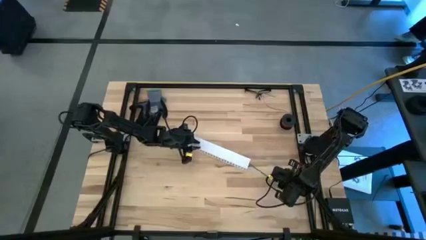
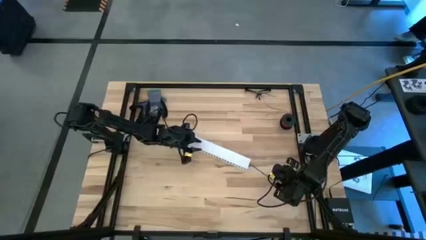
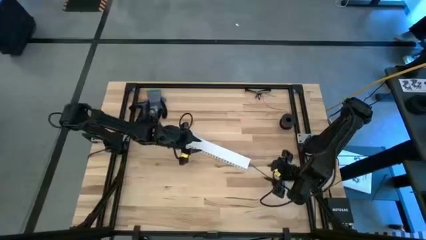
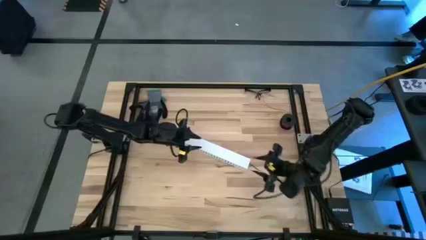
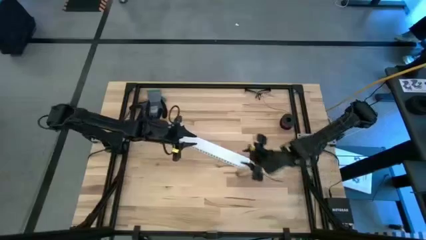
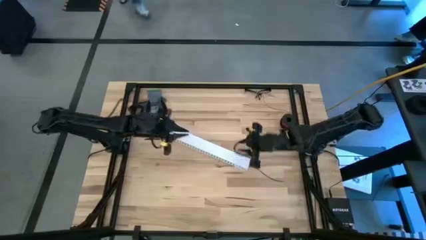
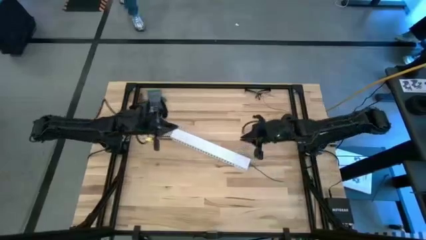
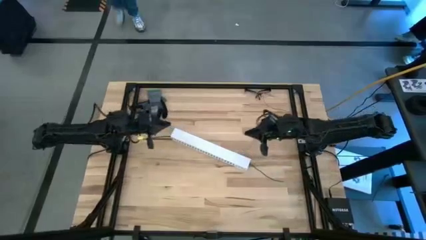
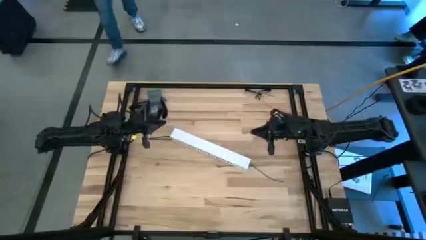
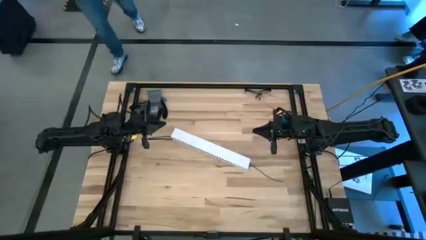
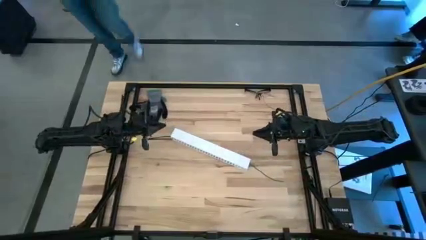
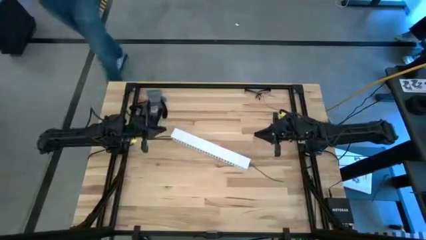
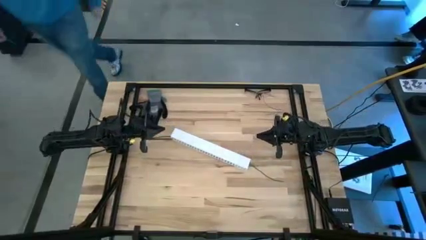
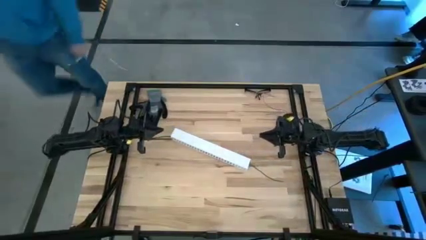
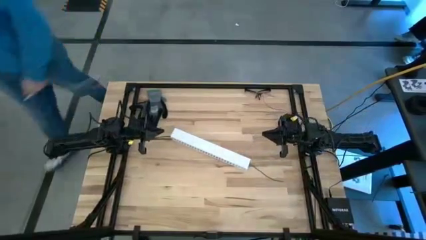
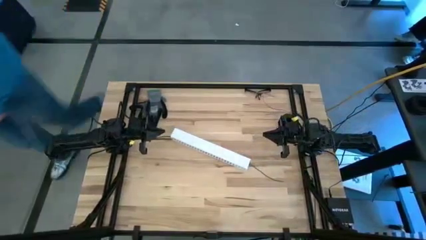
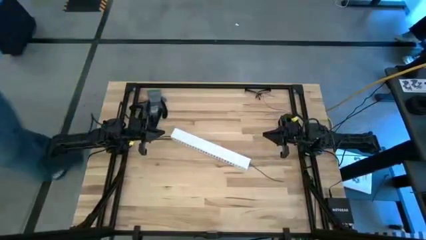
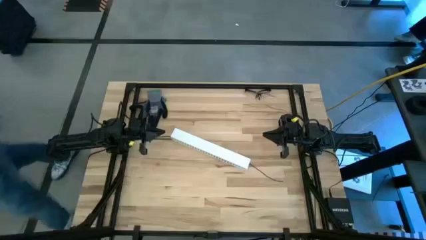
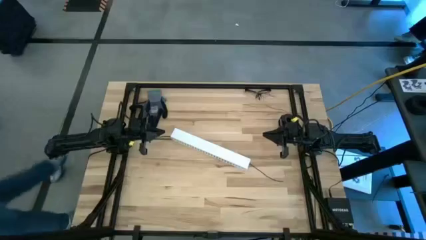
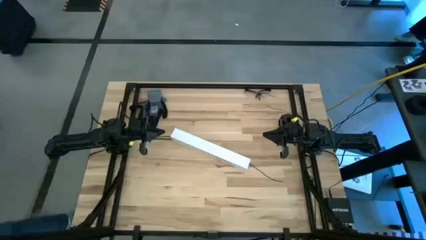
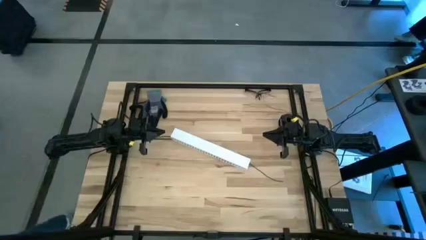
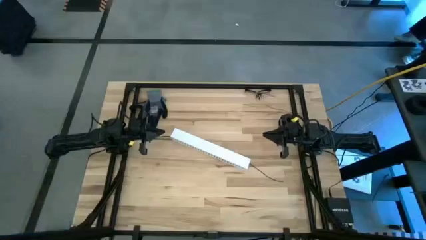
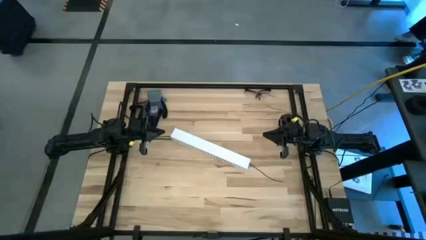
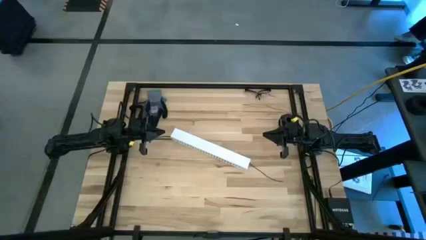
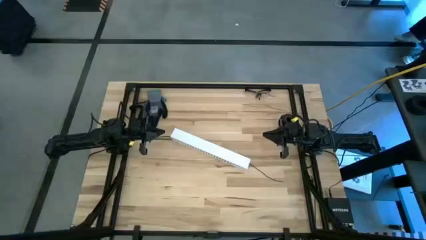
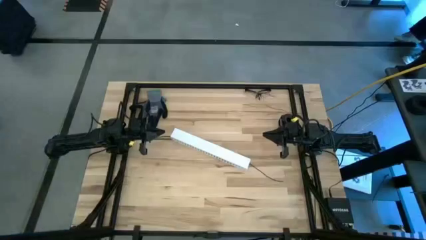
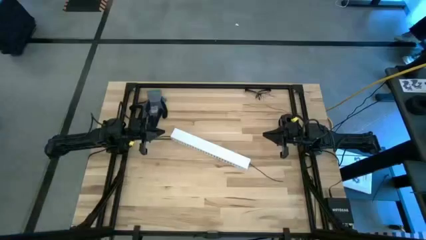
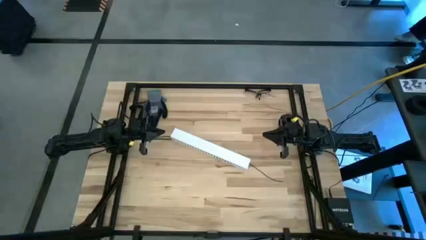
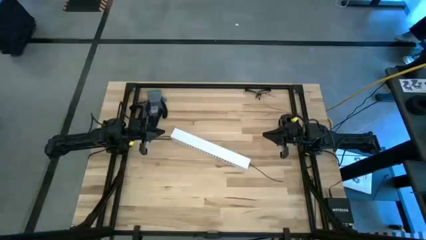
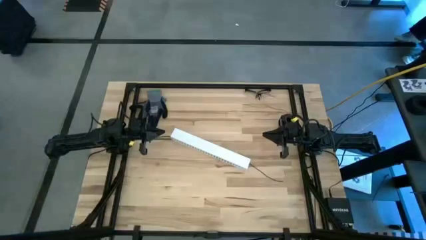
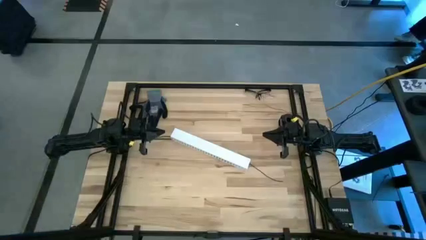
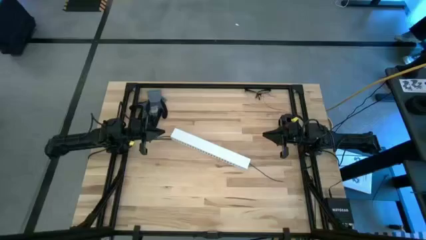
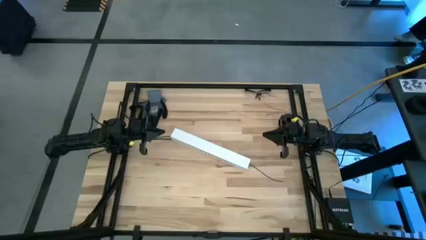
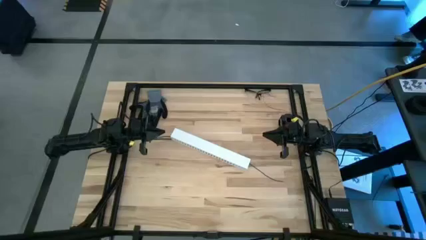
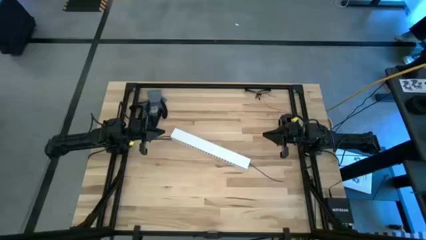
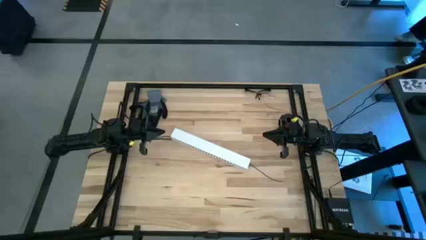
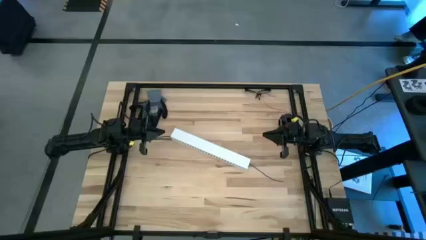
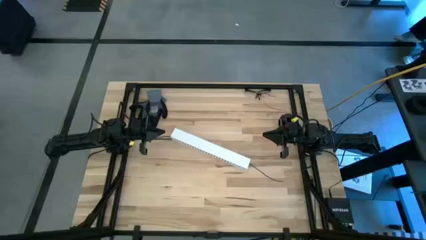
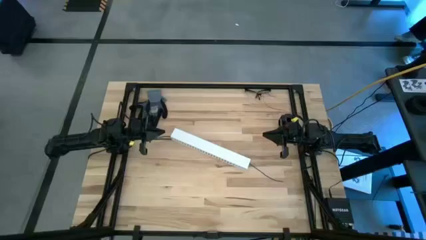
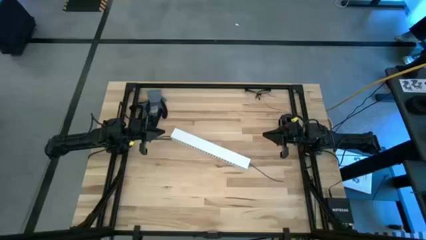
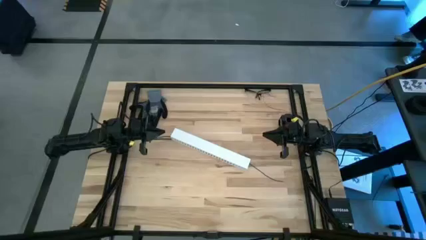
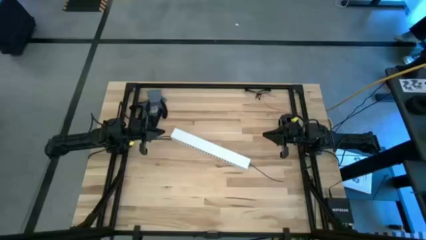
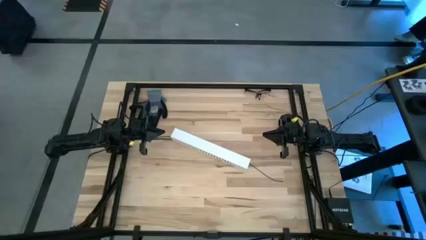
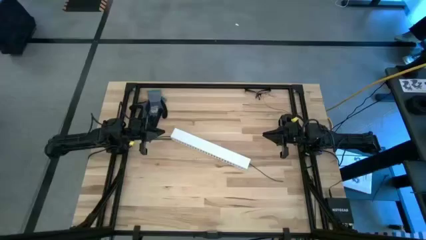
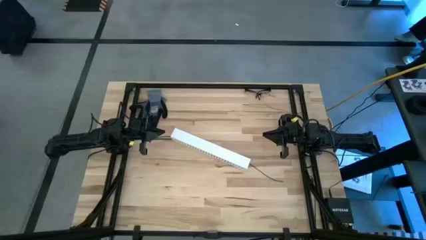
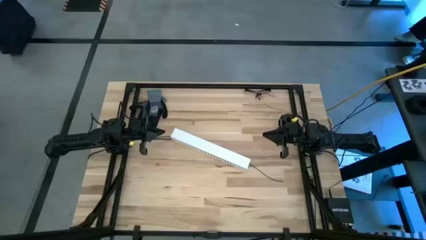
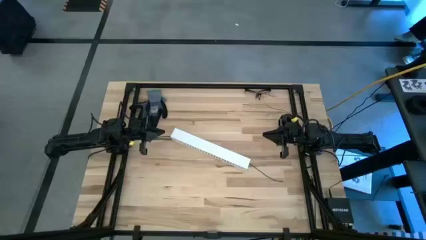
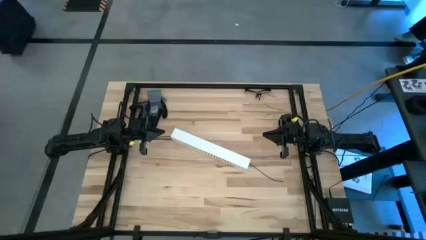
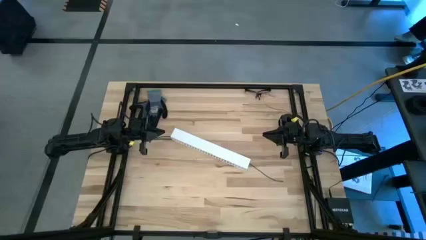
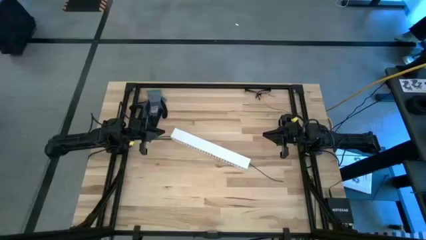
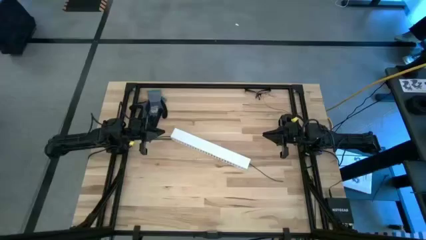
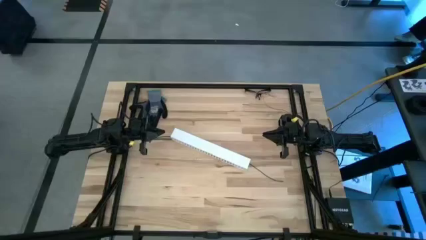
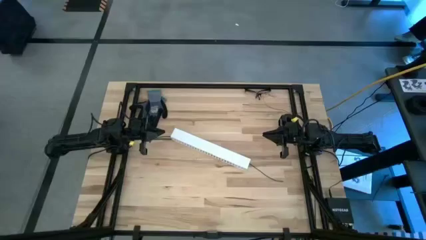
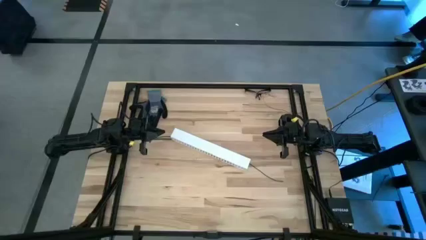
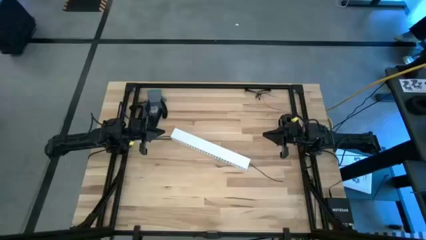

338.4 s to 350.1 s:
Task: Ziptie cables
Return to Home Position

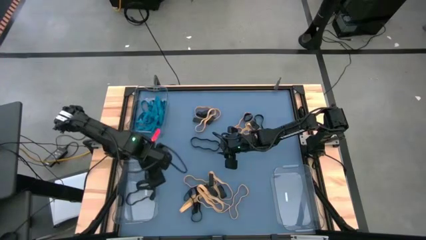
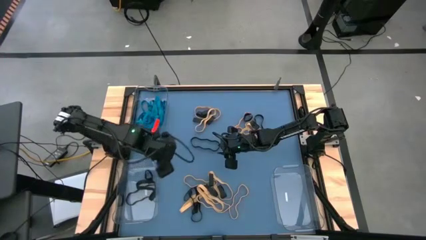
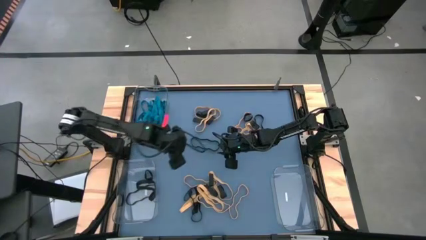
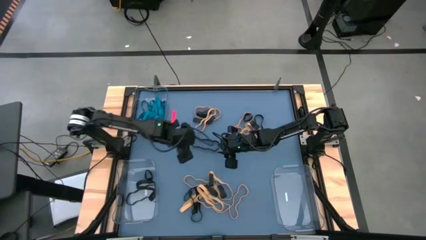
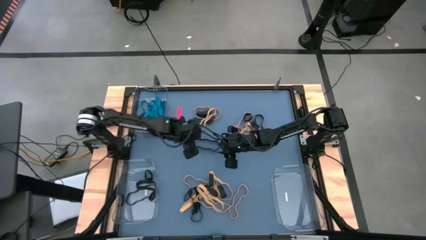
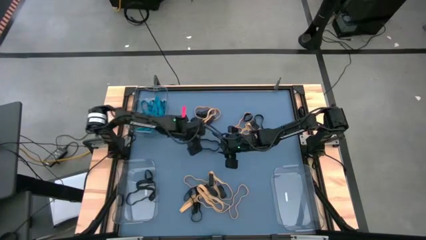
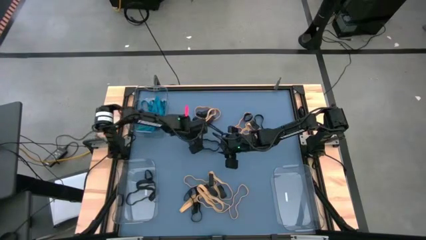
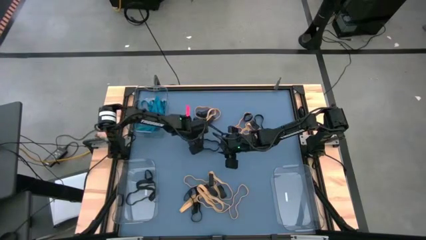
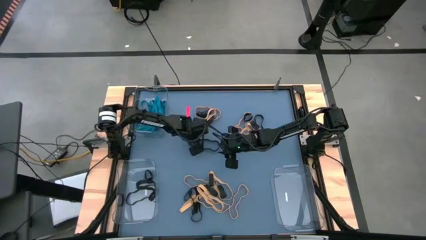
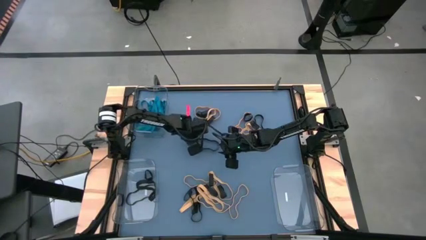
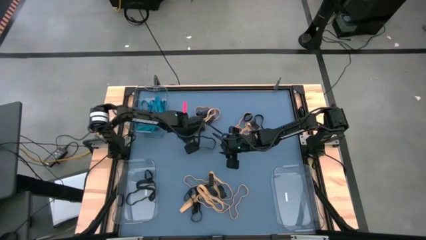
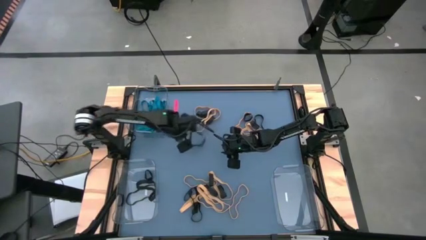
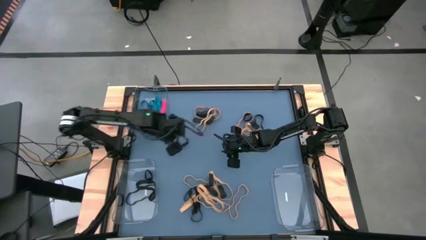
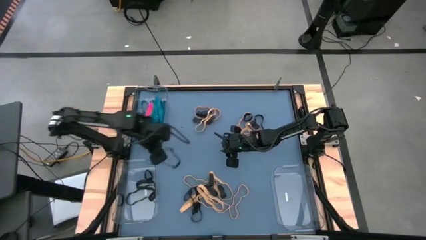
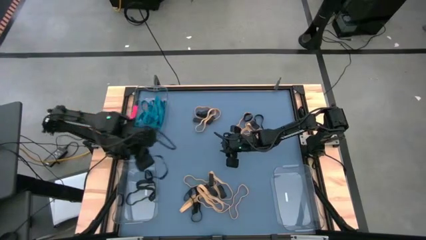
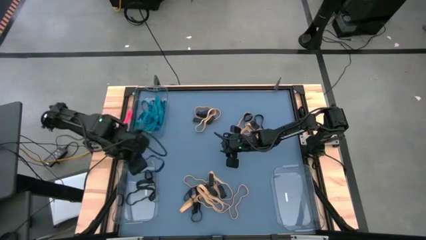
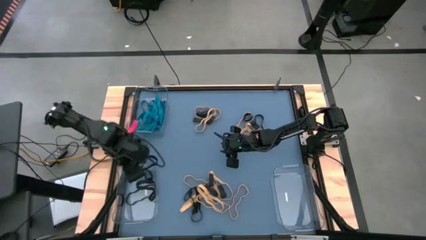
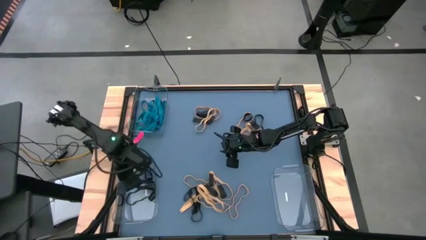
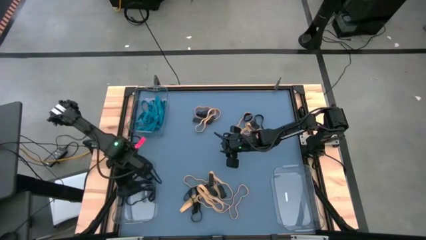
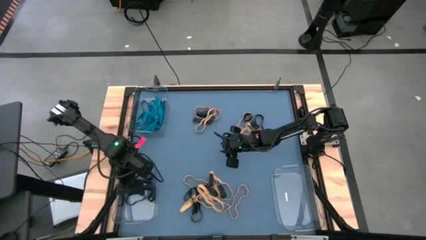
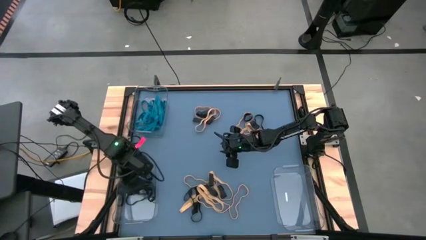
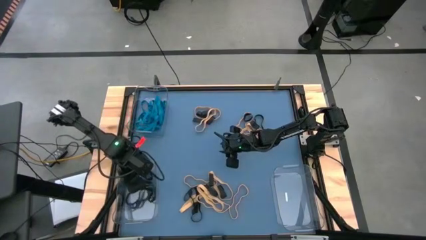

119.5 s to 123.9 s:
Task: Sort rubber bands into baskets
Put the black rubber band into the bottom left transparent bin

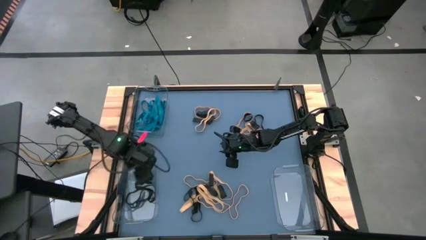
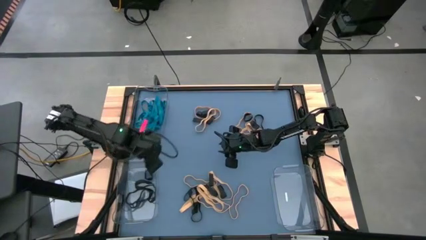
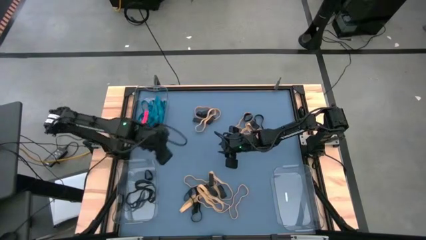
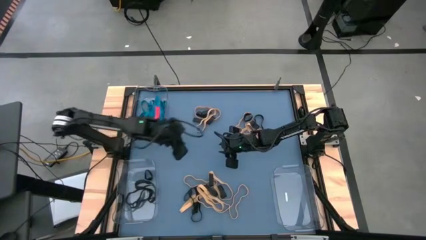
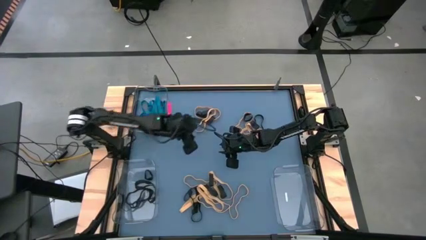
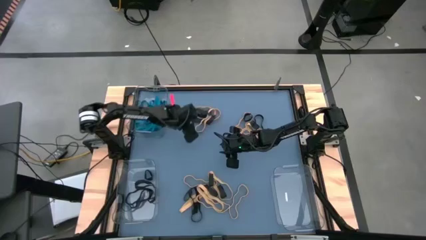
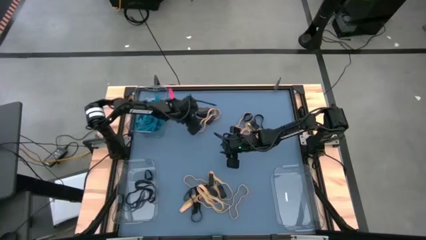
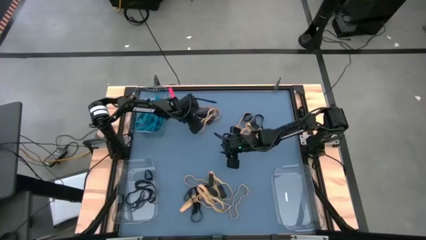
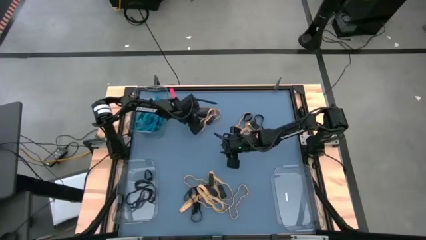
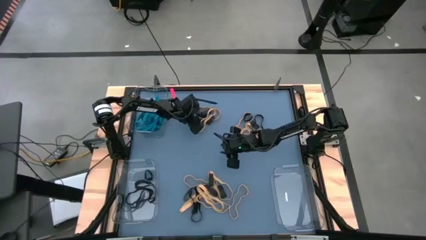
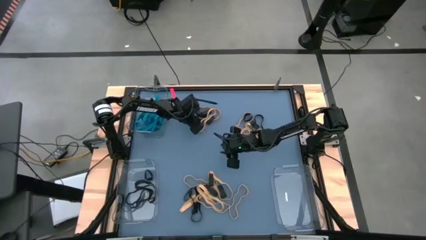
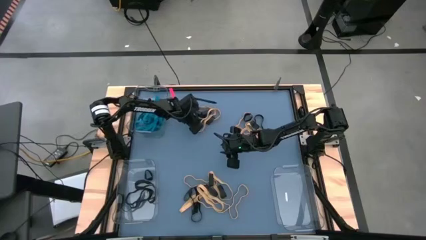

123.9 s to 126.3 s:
Put the black rubber band into the bottom left transparent bin
